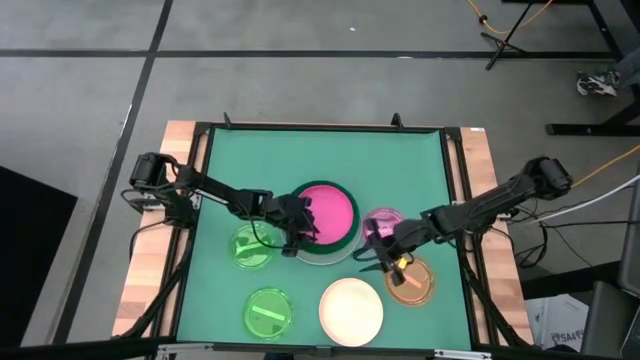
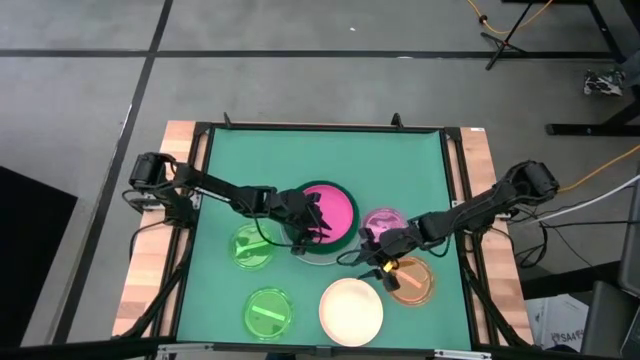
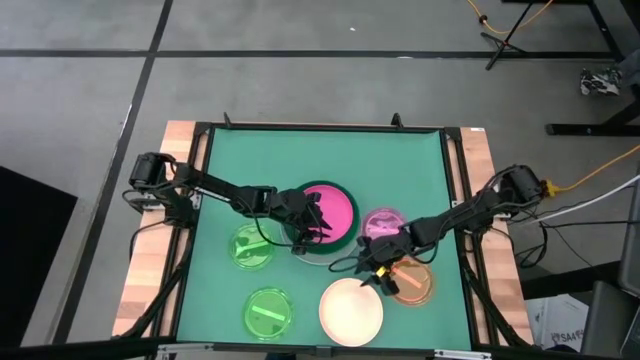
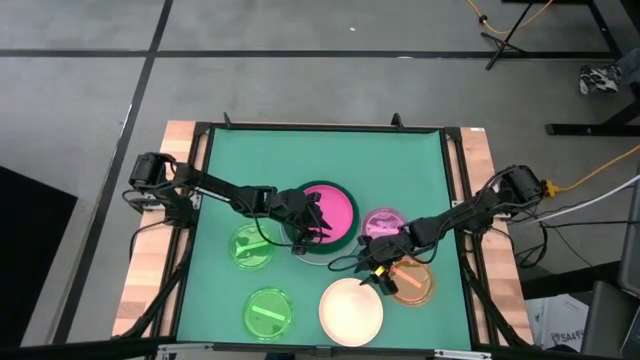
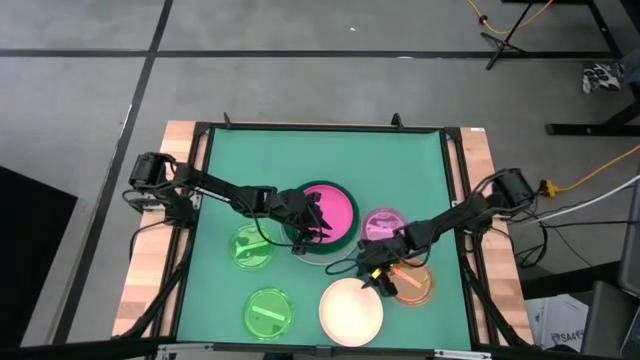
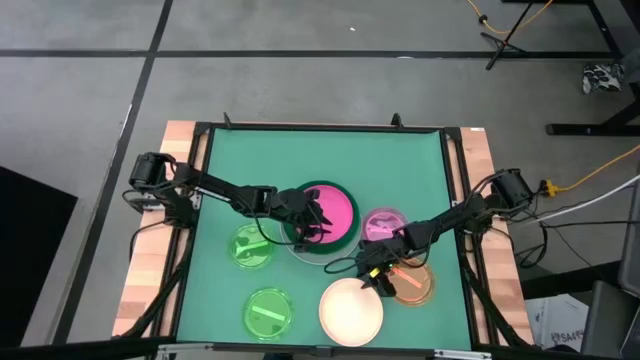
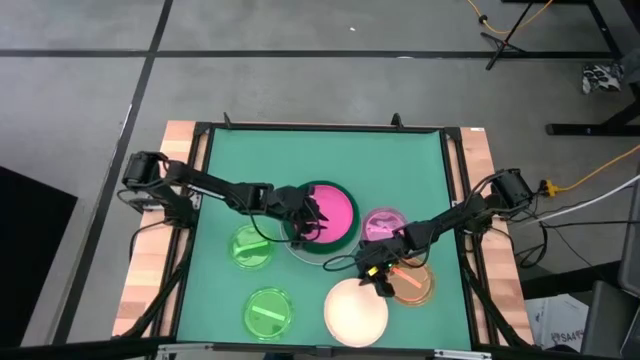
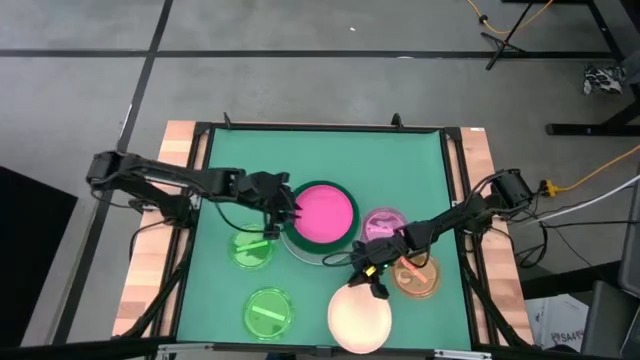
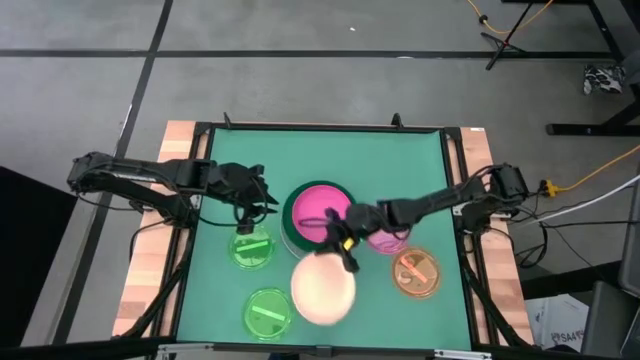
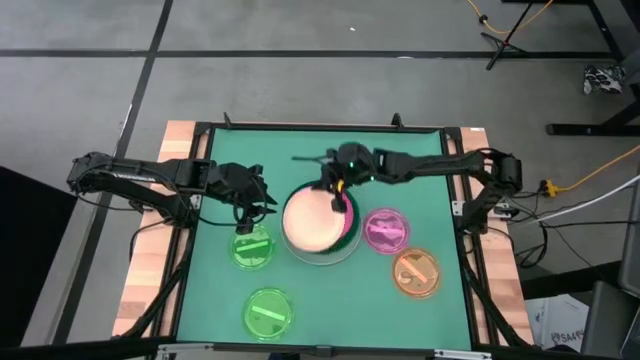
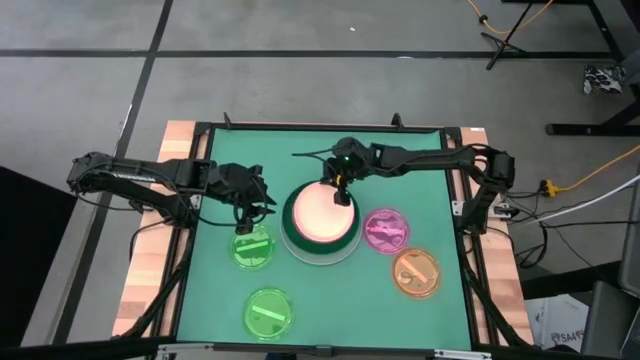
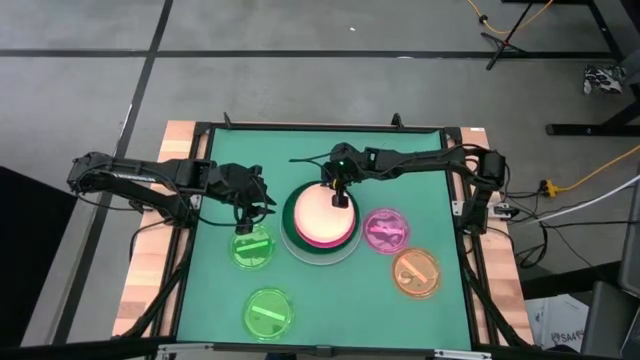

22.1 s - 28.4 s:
Task: Stack plastic plates
Stack the light orange plate on top of the pink plate

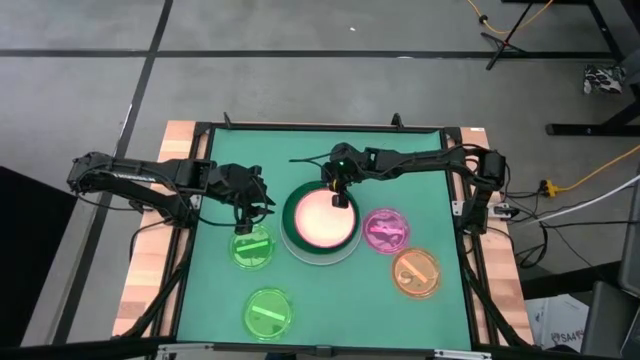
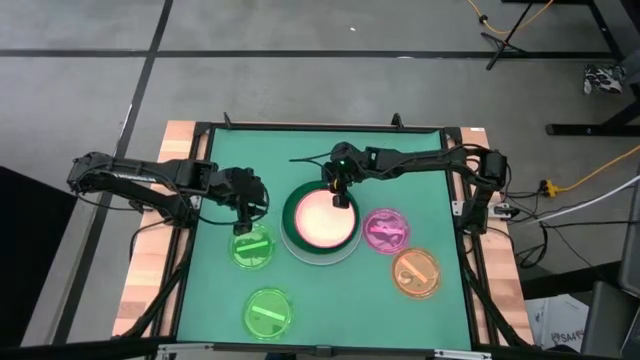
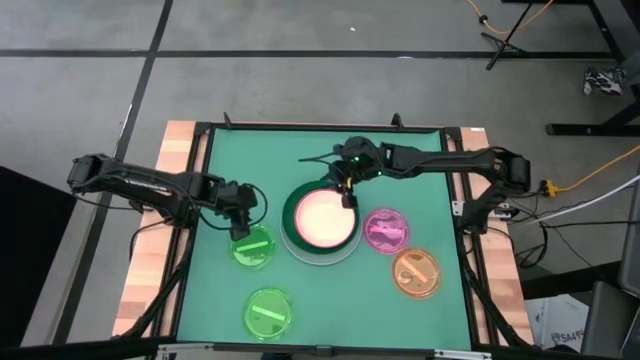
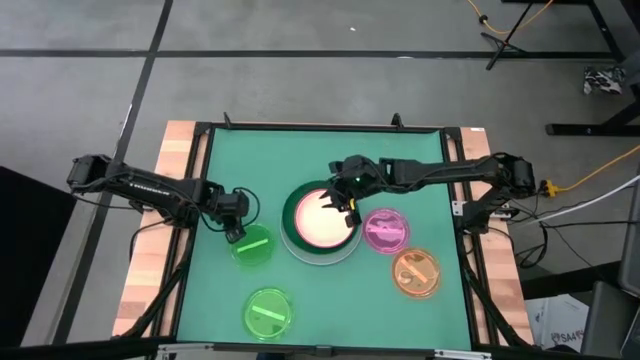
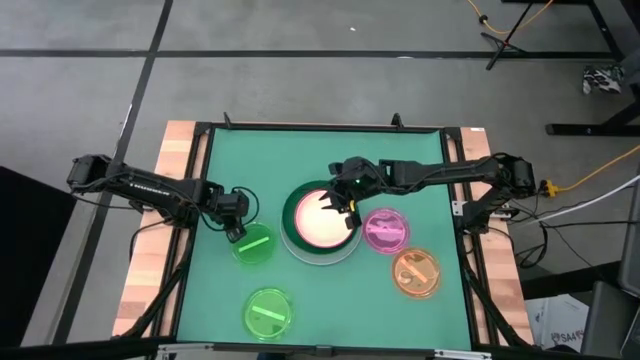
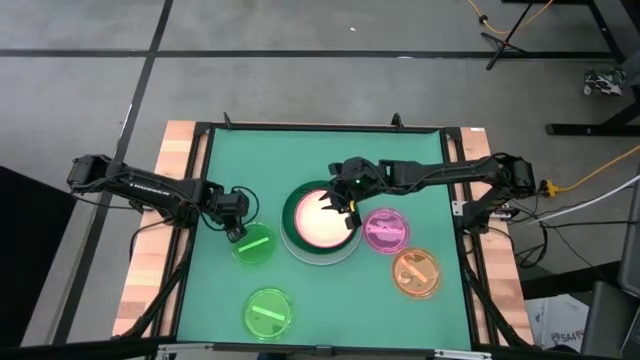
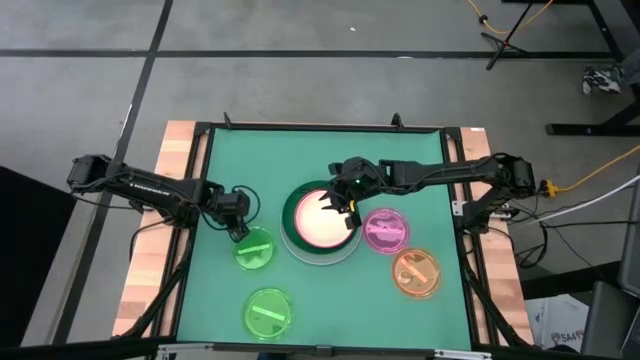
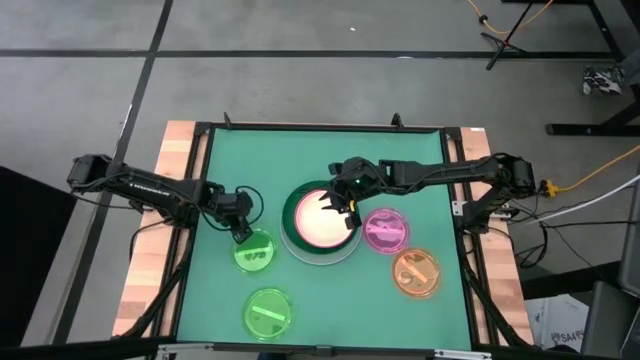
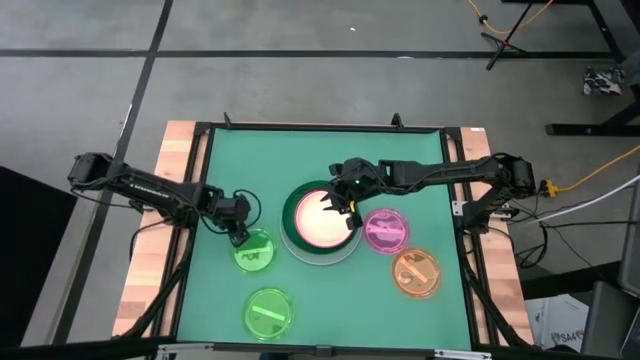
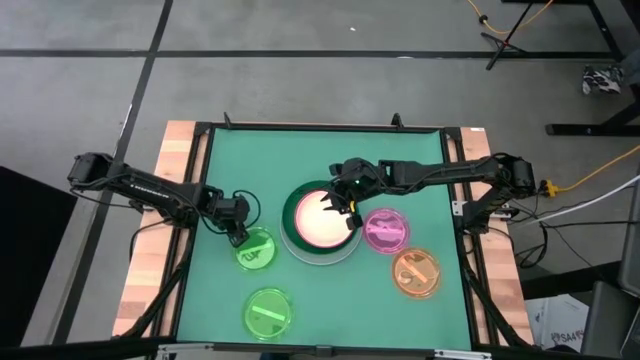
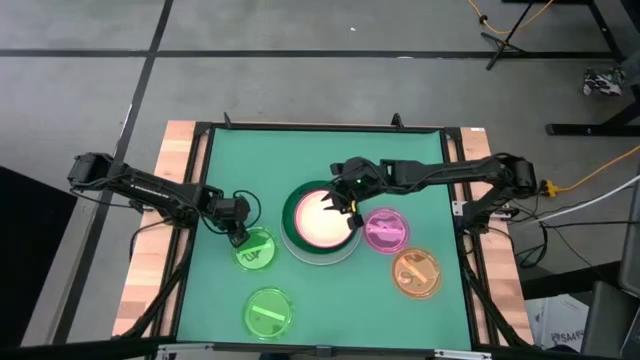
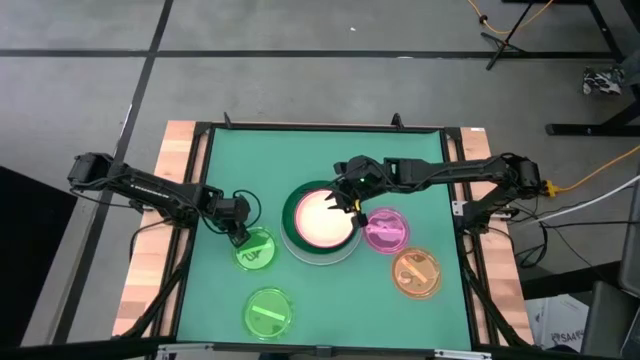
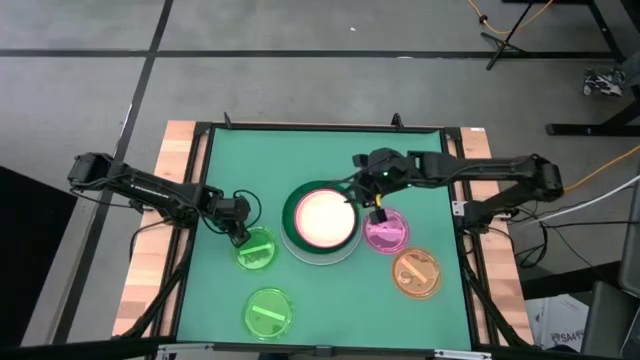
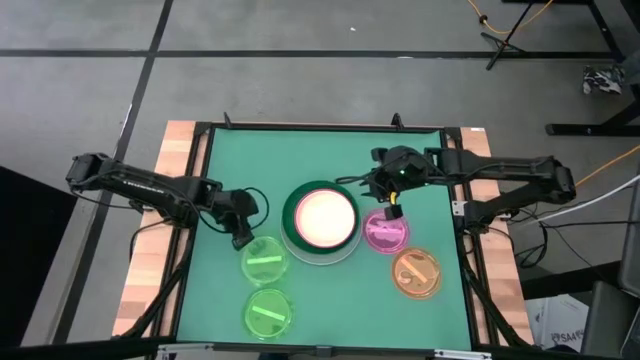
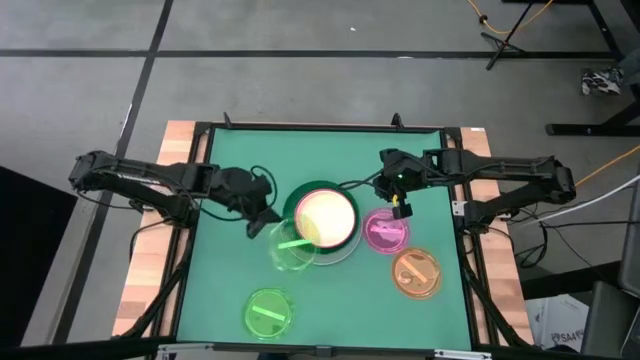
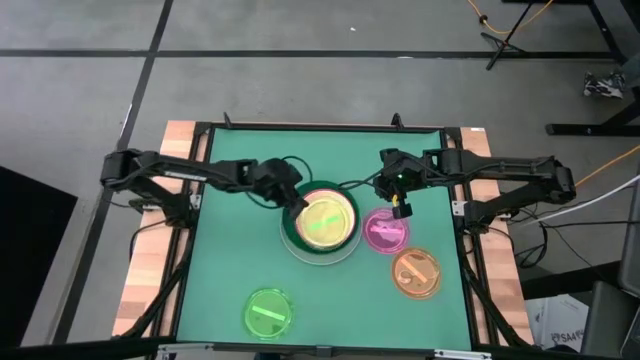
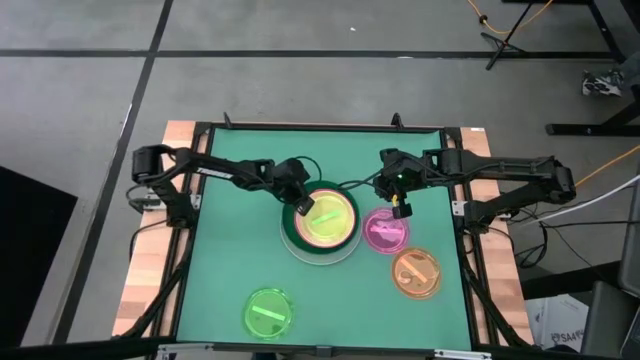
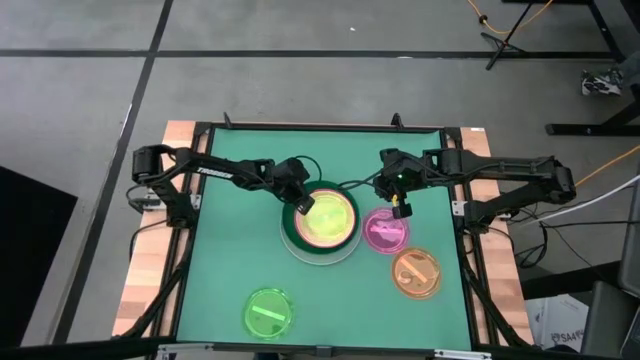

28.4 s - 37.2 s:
Stack the top light green plate on top of the light orange plate

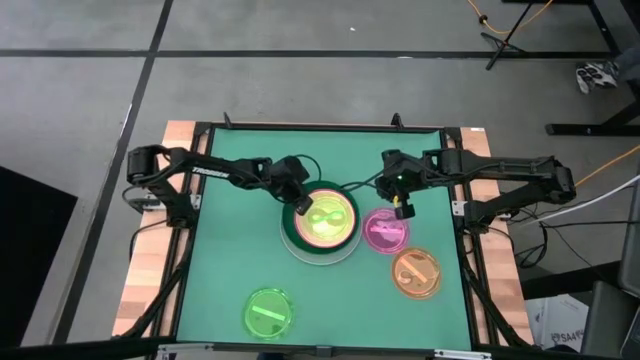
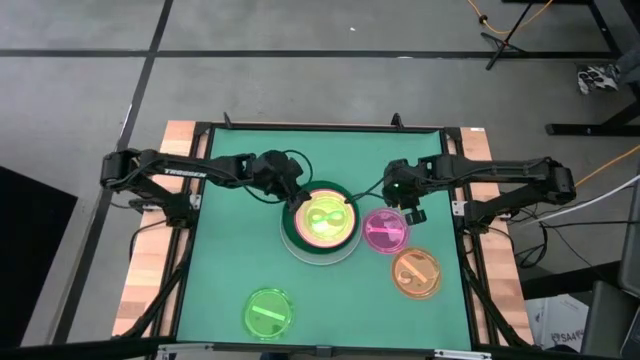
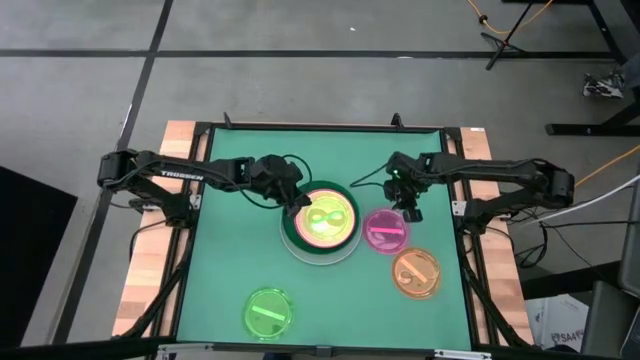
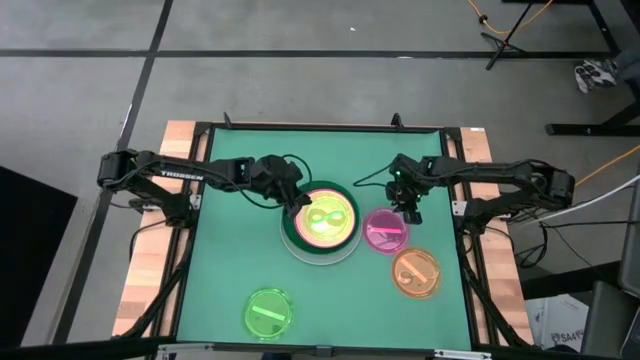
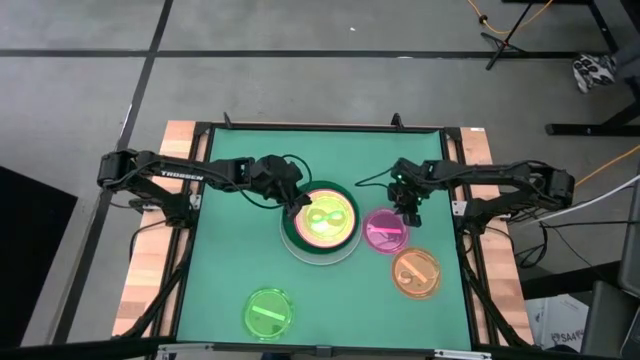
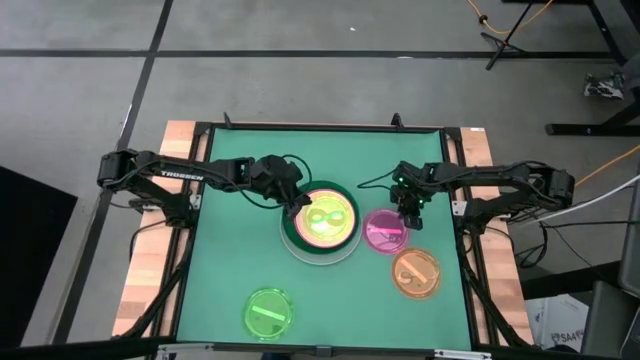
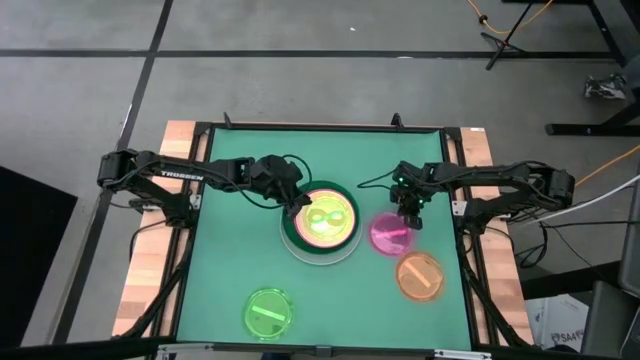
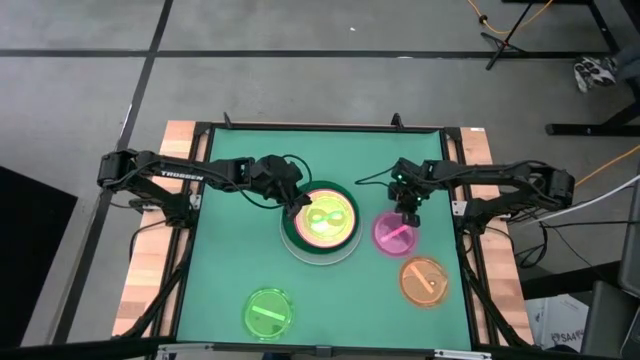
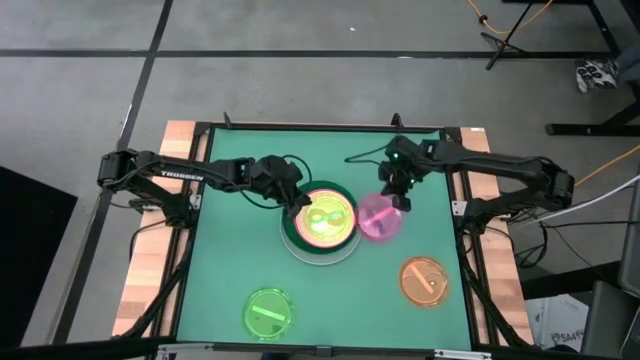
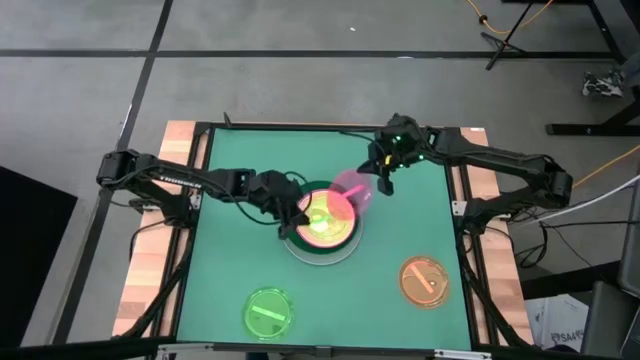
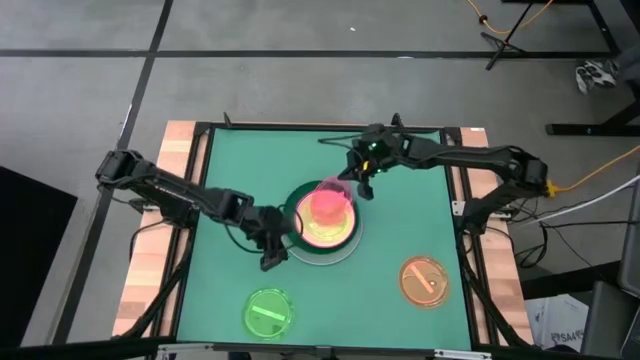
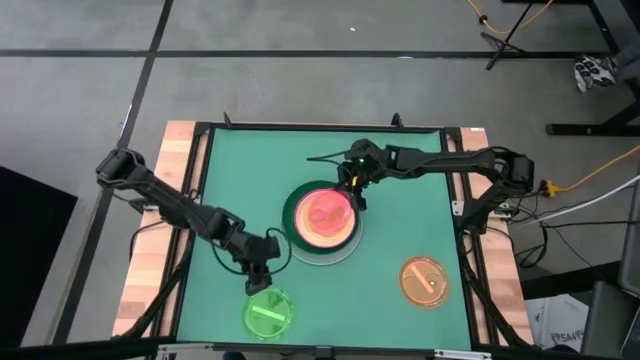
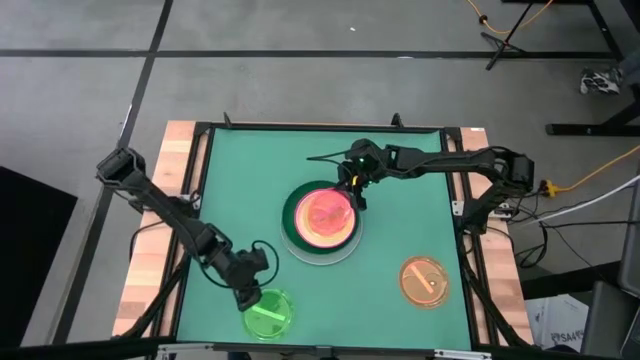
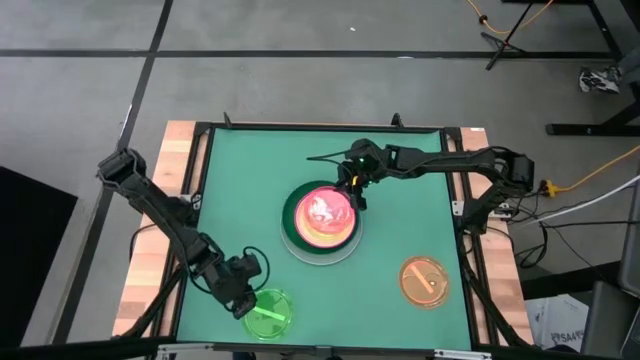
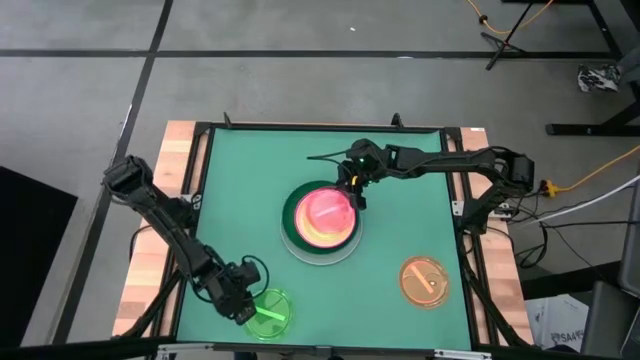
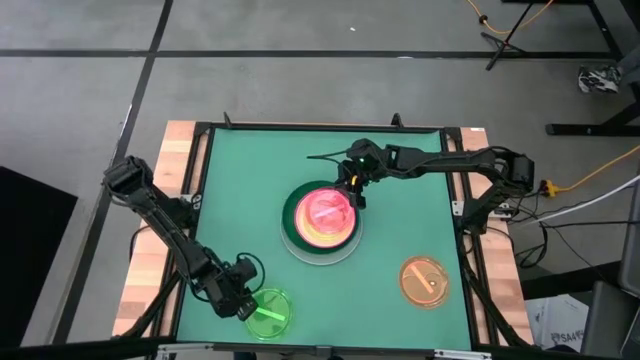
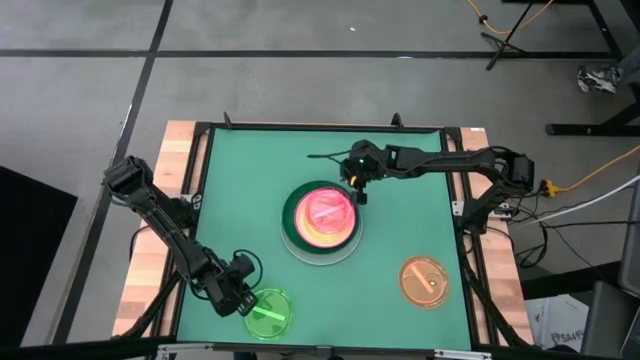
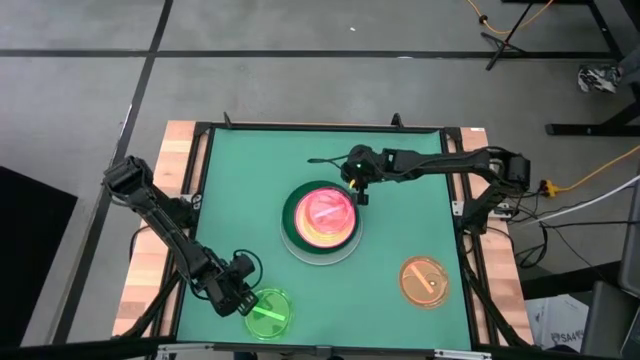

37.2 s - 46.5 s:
Stack the light pink plate on top of the light green plate
